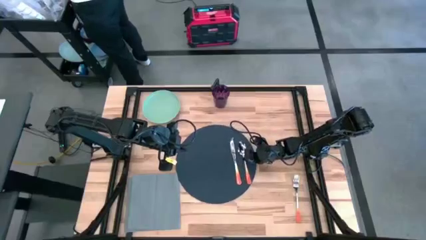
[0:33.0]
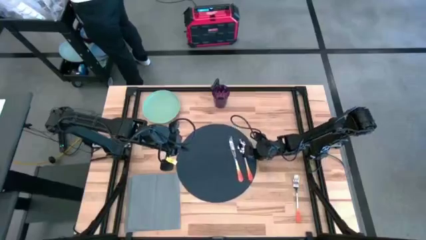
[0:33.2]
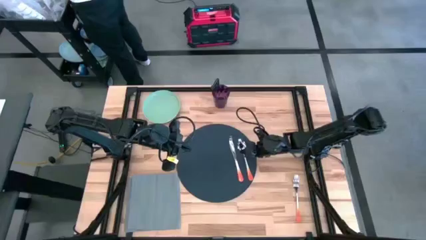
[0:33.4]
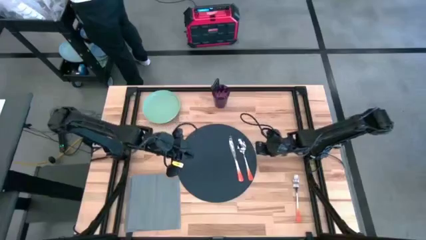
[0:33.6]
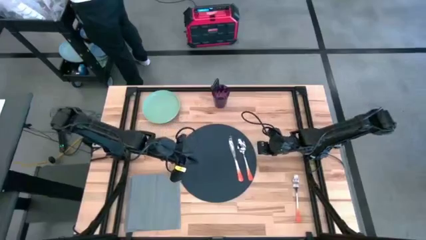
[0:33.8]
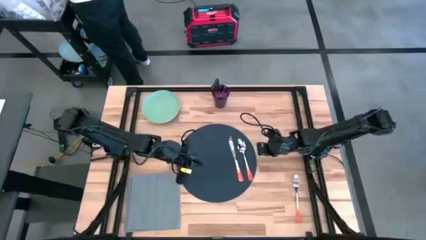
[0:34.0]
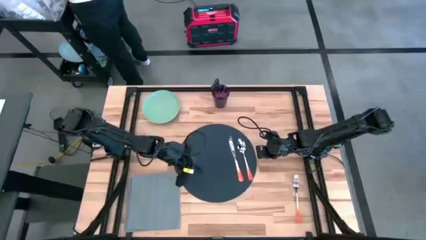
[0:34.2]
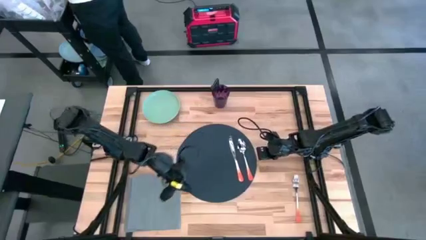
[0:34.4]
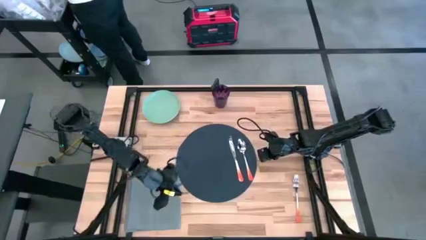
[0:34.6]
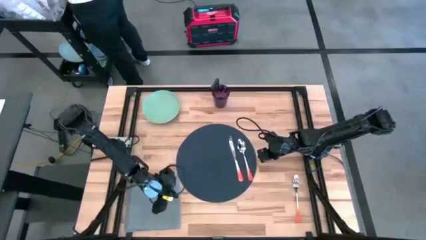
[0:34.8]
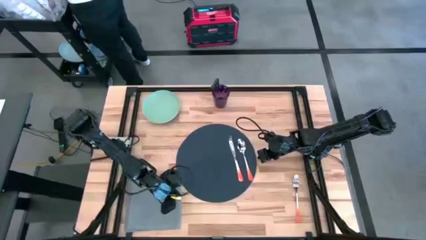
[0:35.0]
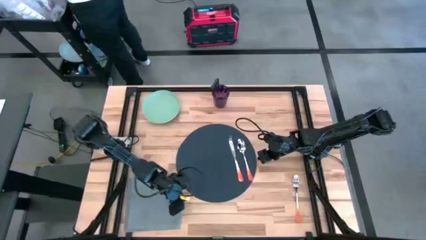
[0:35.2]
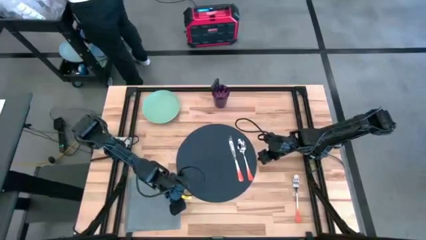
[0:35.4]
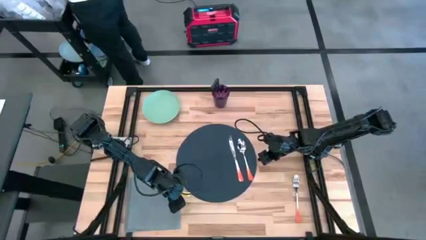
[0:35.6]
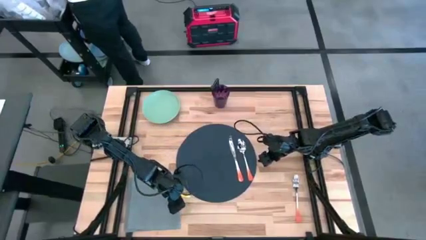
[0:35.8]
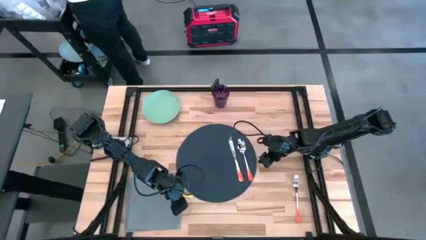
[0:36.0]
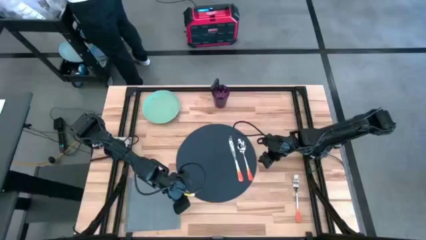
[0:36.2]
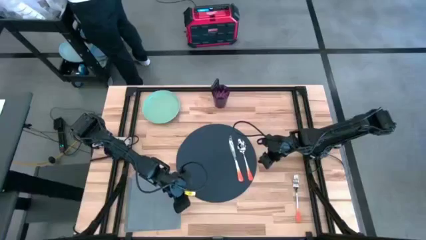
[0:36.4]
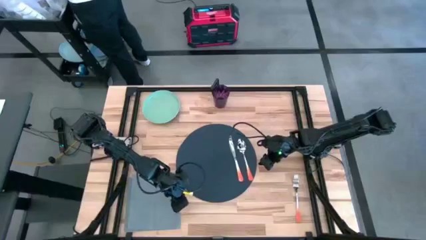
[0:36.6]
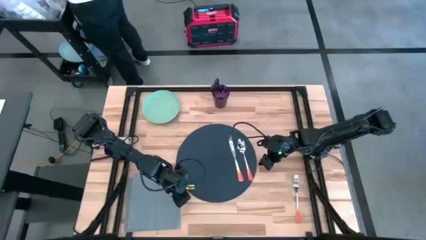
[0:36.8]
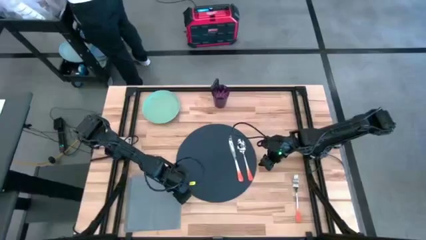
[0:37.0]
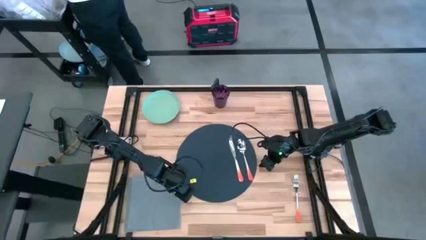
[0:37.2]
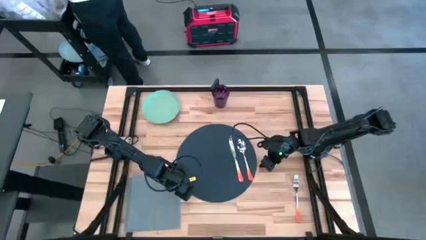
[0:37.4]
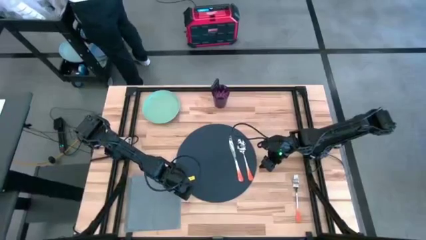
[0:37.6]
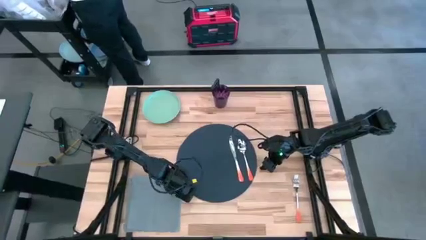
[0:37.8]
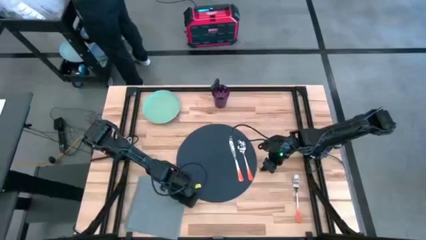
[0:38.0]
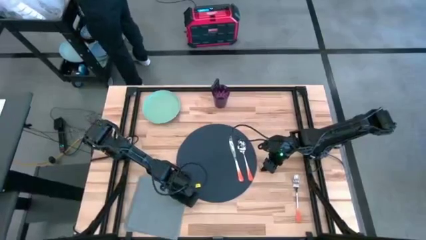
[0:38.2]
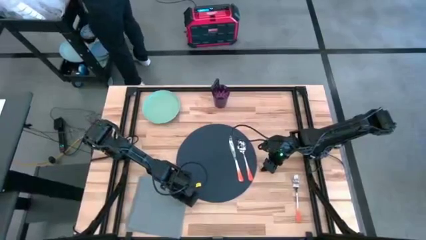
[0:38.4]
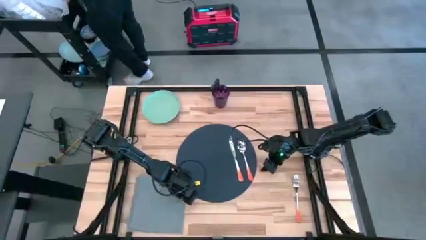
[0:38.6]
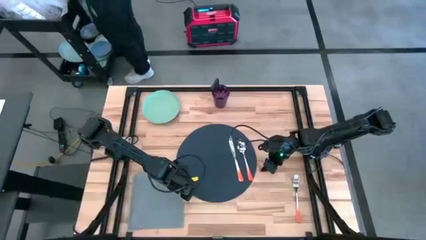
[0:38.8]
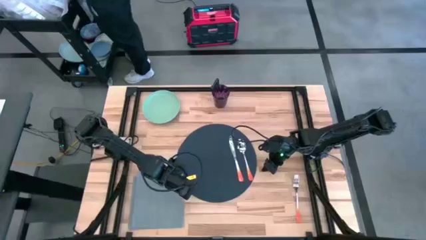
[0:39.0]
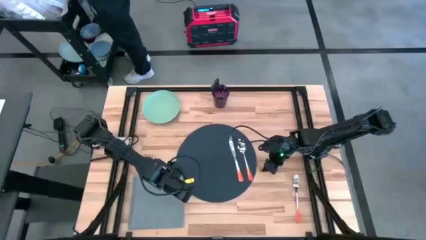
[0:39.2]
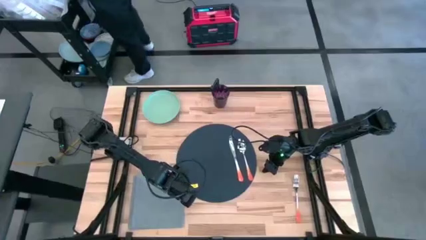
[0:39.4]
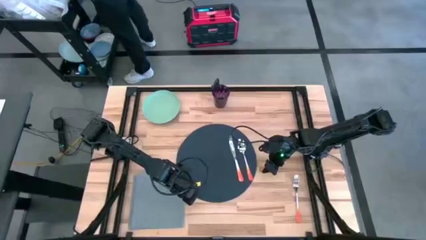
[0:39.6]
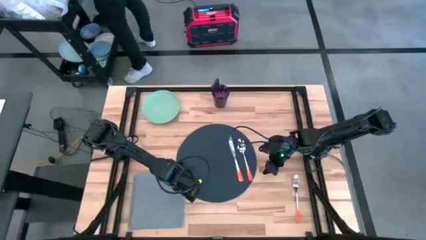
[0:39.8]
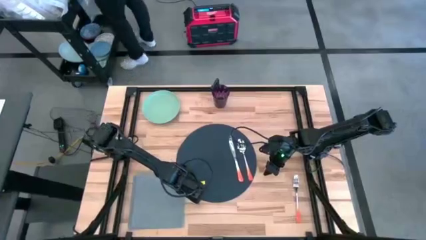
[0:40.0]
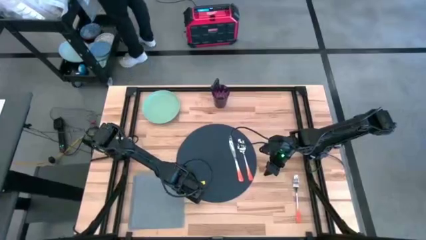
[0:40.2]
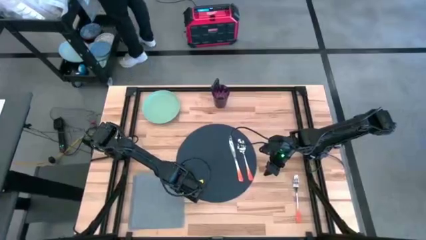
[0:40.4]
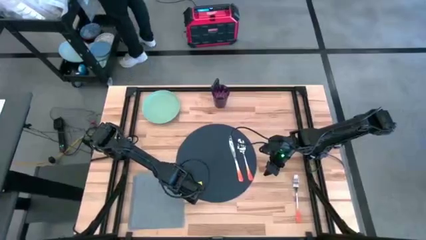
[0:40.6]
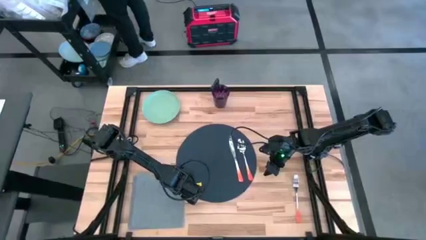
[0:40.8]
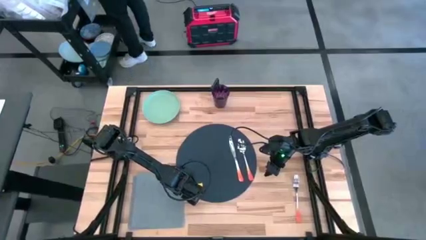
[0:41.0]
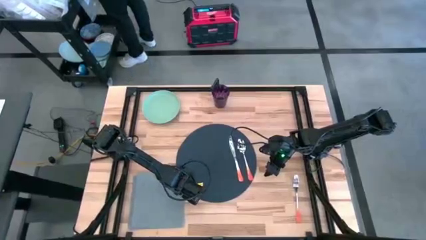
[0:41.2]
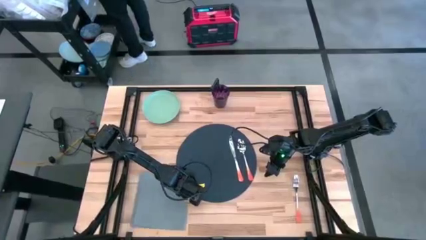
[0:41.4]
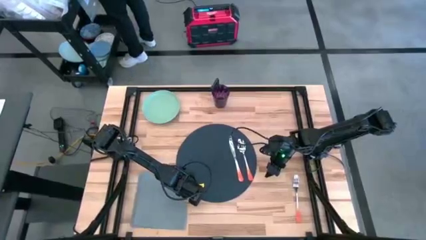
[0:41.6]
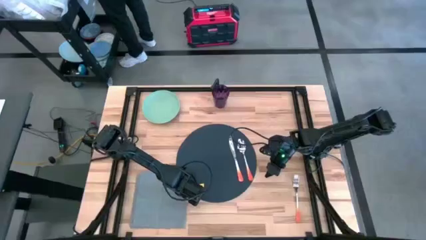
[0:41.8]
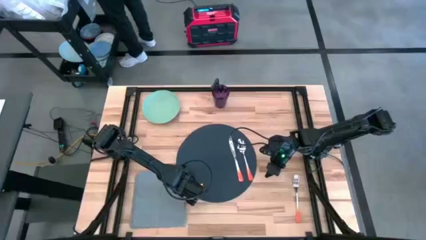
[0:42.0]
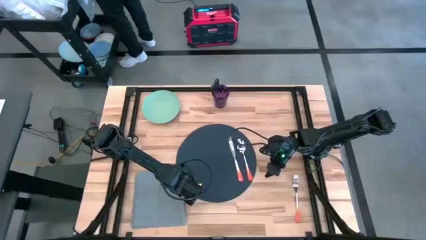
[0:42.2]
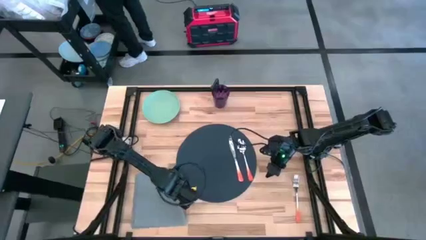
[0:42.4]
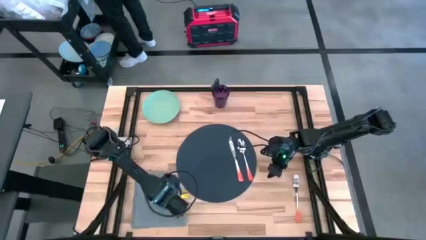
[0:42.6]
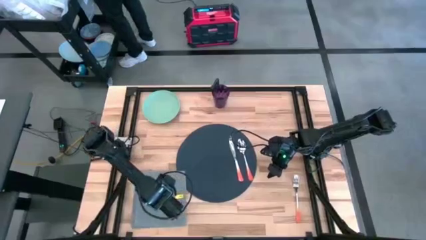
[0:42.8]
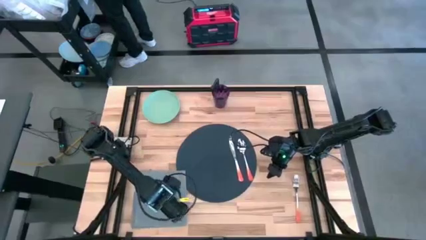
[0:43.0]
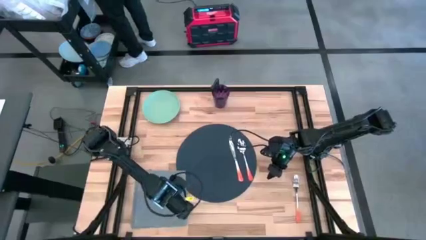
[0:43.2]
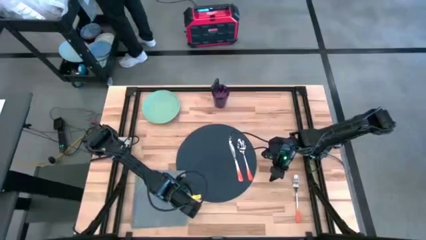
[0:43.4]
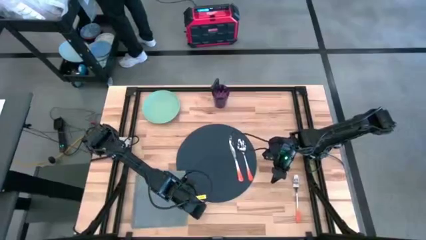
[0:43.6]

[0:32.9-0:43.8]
Task: Set table place
Fold the table napkin

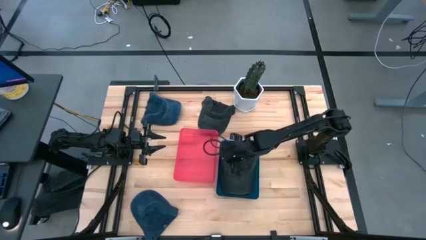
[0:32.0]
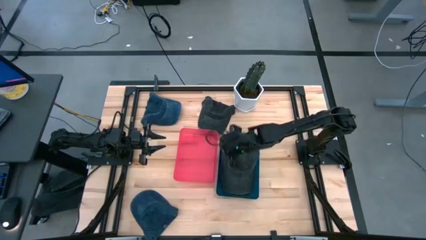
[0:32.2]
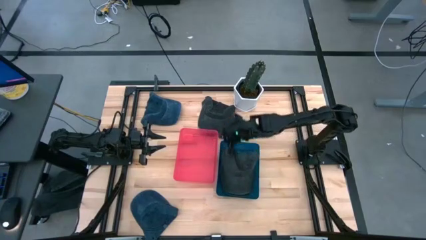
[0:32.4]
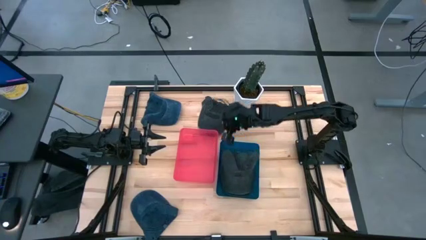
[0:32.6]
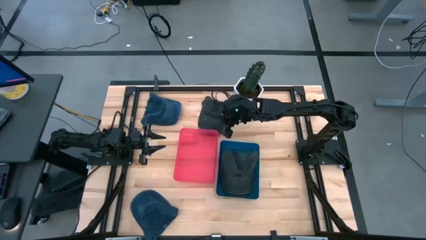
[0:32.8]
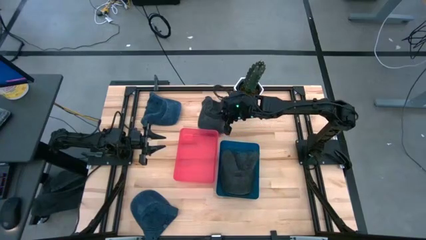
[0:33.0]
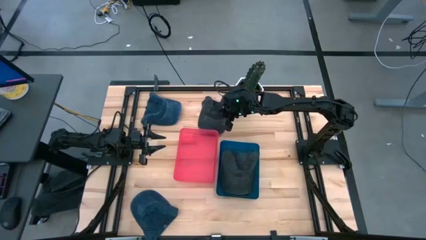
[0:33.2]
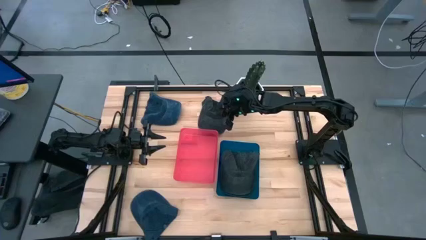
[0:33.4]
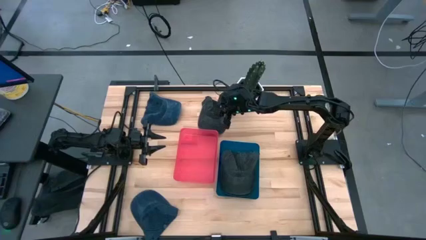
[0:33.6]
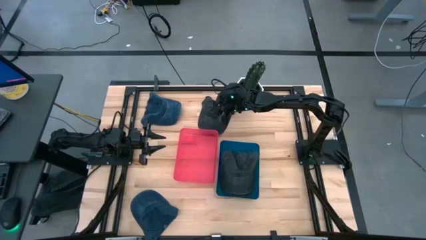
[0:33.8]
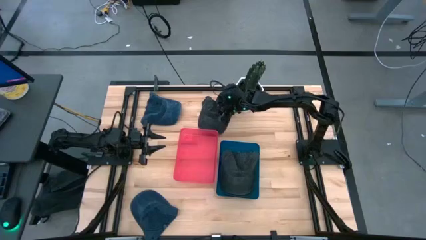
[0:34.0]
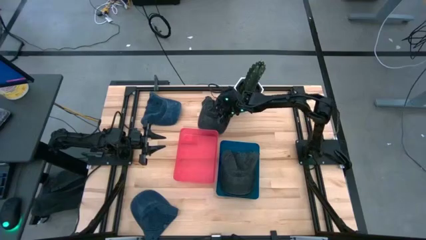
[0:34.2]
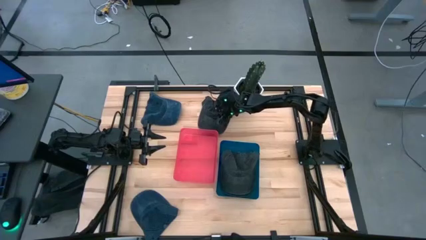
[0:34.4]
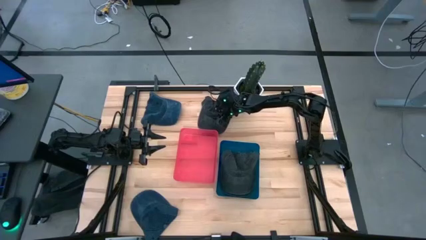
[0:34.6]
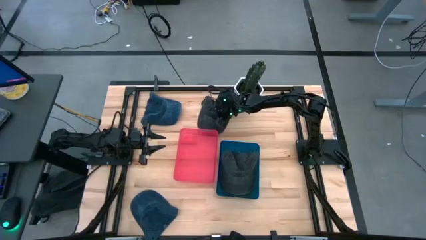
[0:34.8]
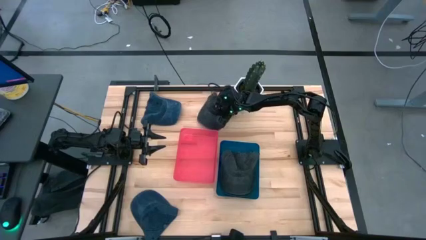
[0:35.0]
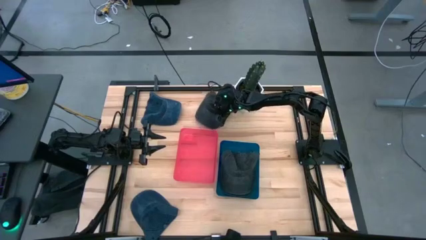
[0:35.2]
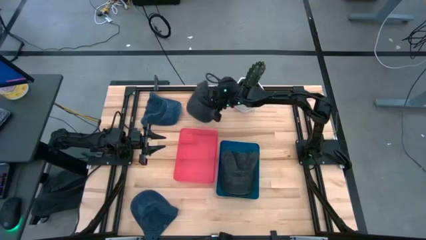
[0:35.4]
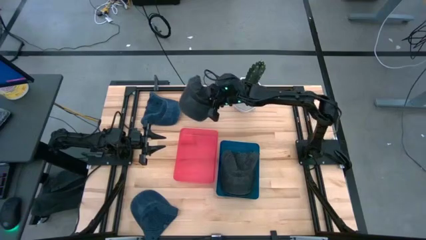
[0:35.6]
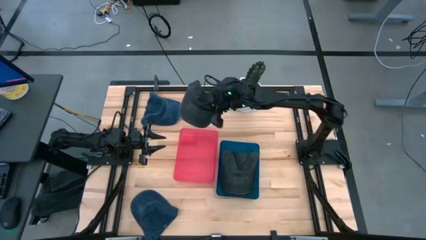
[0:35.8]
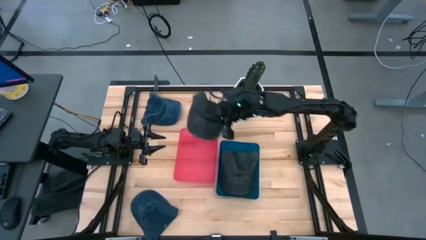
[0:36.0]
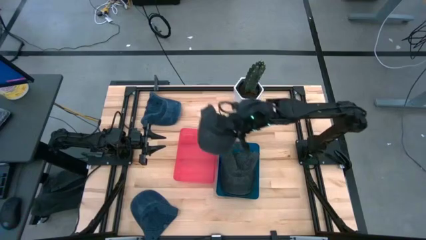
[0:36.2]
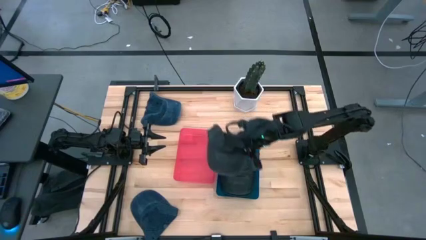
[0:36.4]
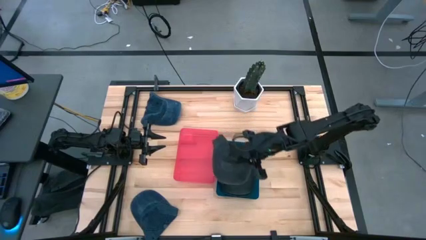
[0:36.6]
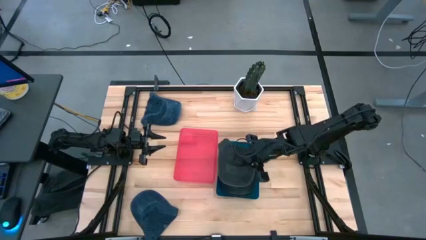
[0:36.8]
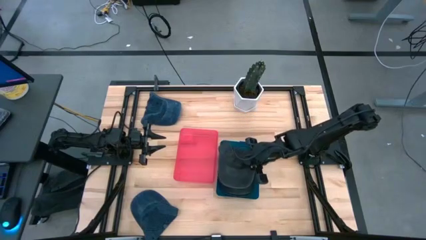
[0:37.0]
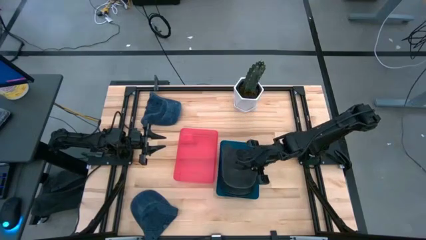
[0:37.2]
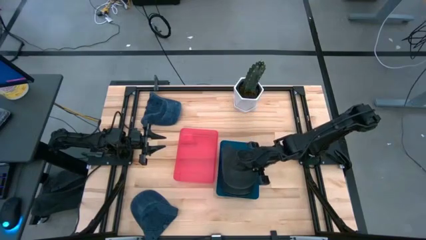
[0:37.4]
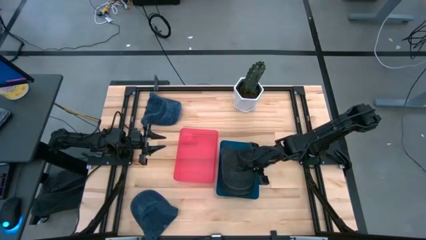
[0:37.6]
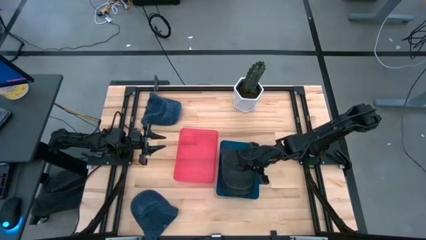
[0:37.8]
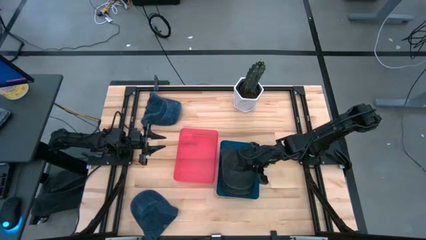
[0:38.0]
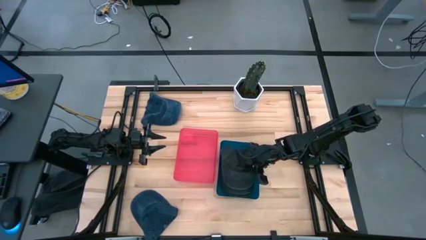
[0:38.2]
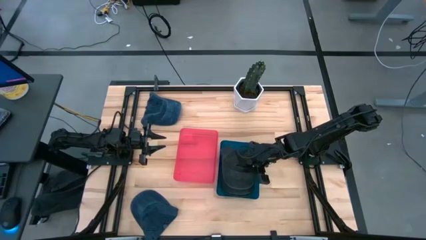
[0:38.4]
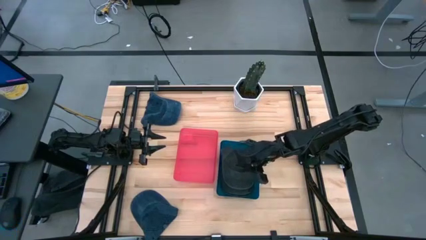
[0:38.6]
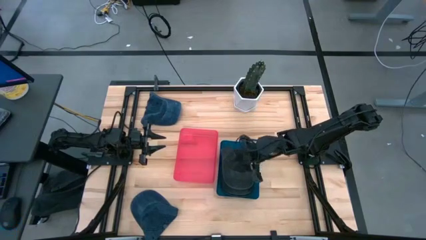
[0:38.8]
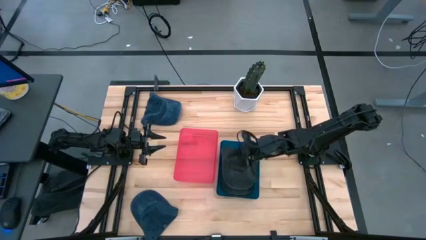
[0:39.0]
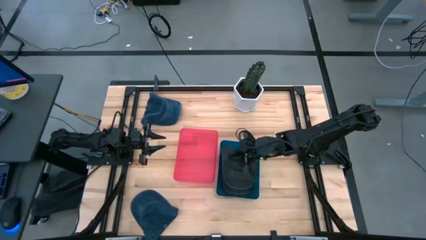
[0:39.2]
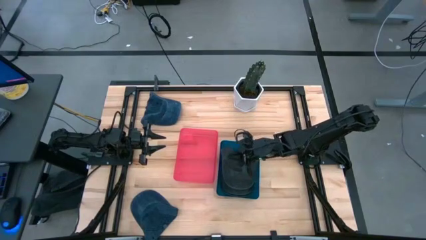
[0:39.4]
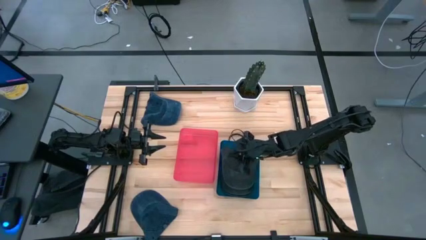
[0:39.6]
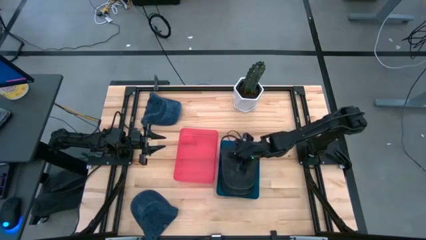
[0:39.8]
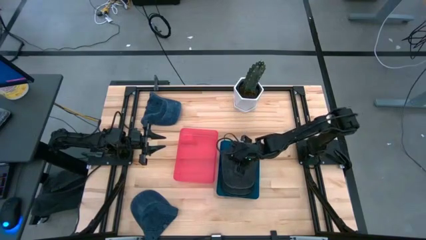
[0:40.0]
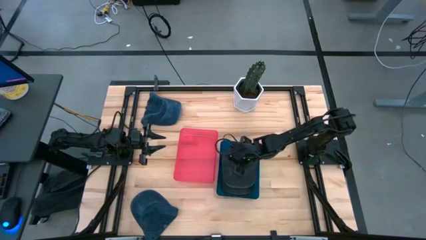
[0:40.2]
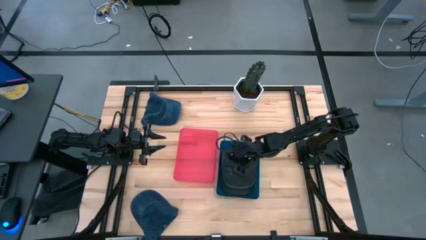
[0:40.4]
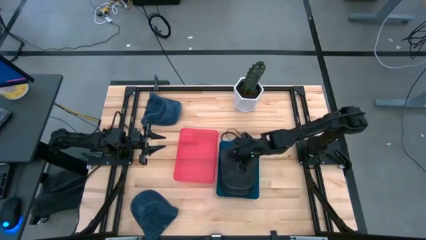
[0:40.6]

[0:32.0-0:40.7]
Task: Pick & Place hat
Put the black cap into the blue bin
